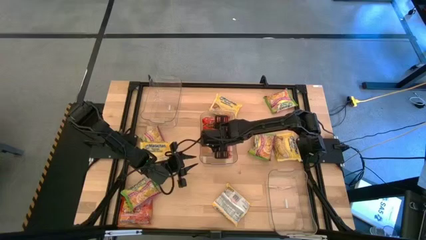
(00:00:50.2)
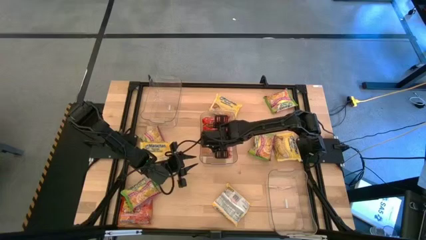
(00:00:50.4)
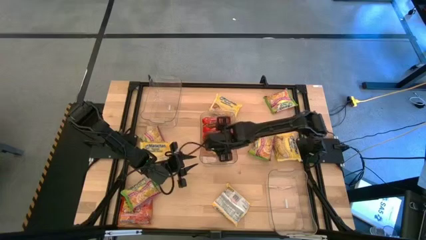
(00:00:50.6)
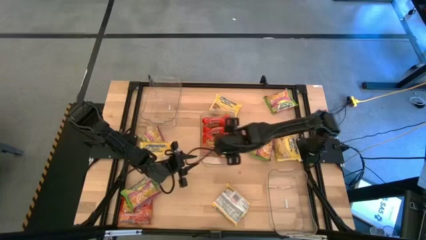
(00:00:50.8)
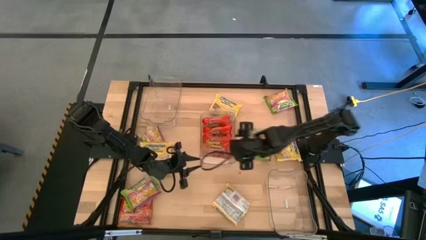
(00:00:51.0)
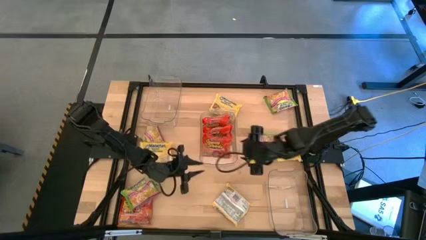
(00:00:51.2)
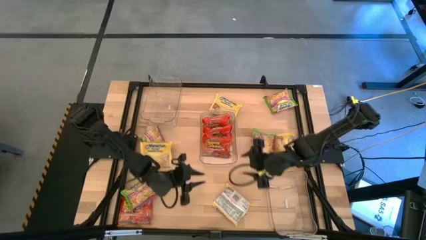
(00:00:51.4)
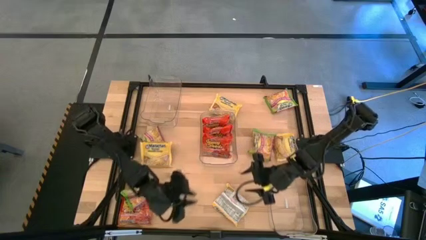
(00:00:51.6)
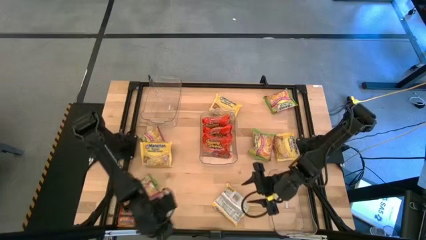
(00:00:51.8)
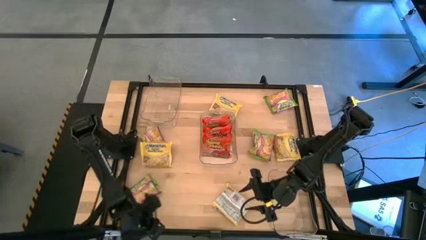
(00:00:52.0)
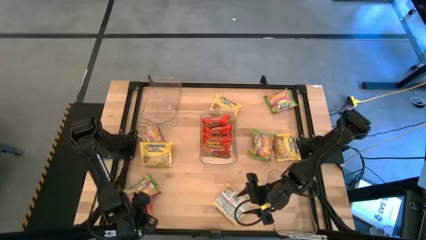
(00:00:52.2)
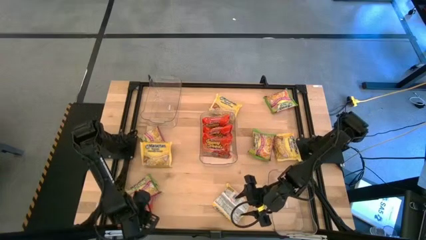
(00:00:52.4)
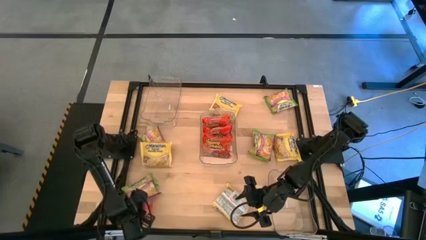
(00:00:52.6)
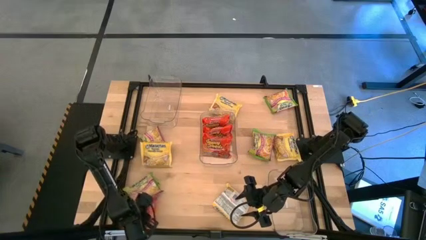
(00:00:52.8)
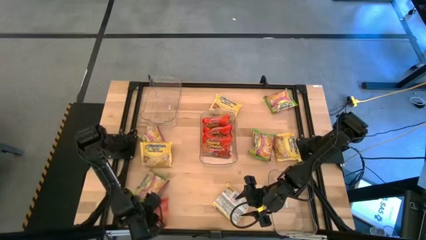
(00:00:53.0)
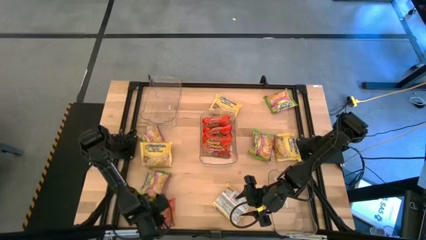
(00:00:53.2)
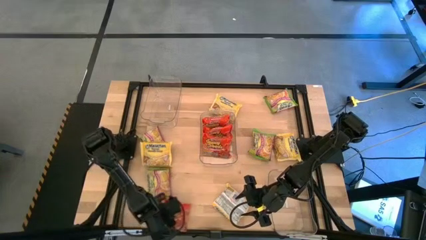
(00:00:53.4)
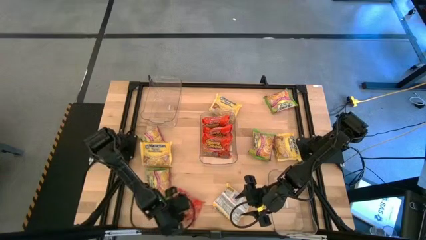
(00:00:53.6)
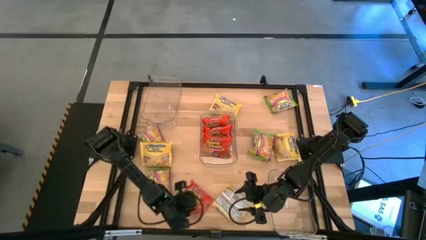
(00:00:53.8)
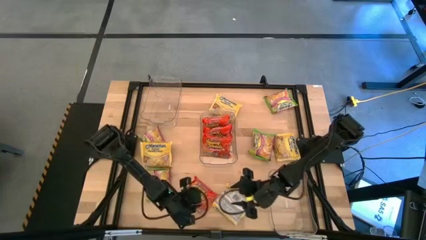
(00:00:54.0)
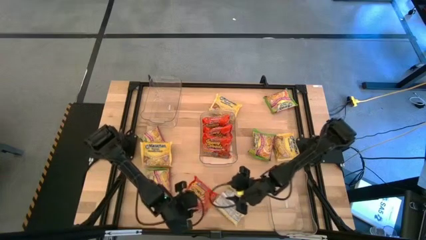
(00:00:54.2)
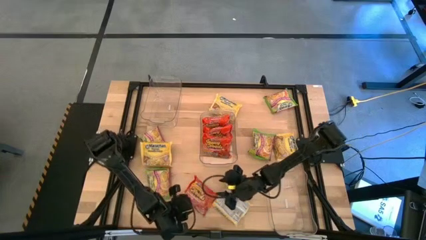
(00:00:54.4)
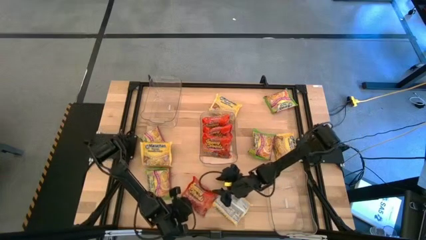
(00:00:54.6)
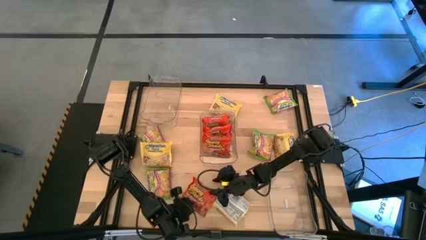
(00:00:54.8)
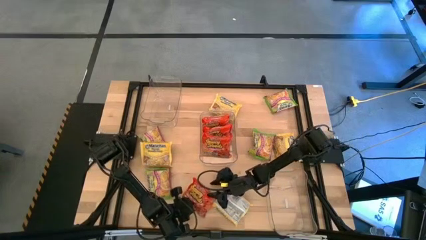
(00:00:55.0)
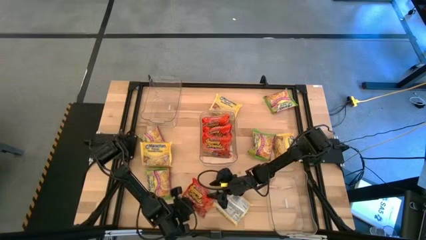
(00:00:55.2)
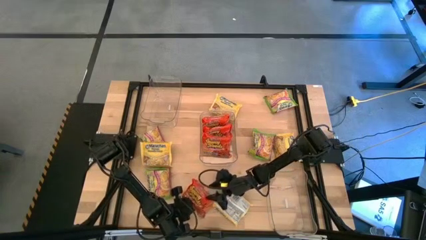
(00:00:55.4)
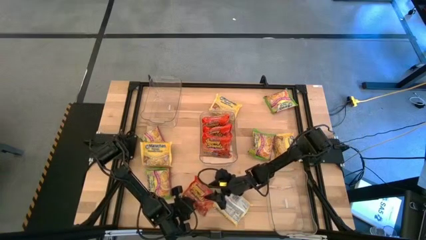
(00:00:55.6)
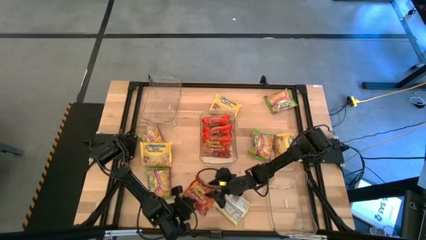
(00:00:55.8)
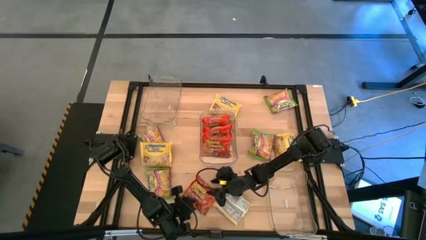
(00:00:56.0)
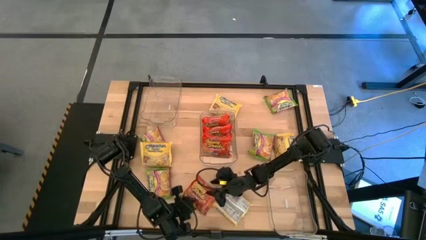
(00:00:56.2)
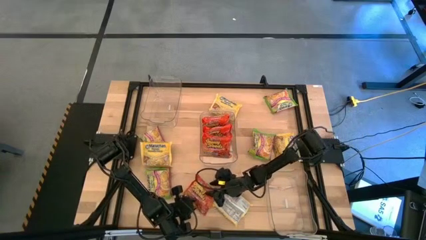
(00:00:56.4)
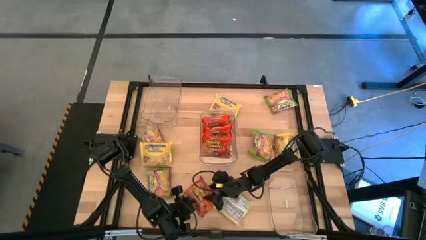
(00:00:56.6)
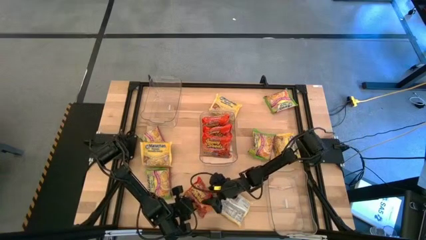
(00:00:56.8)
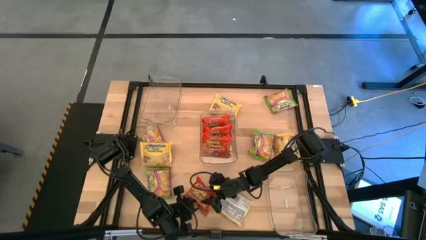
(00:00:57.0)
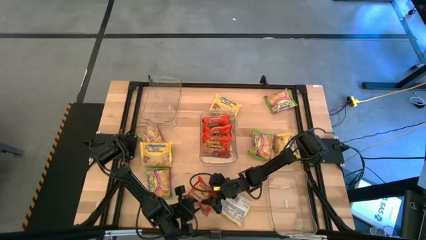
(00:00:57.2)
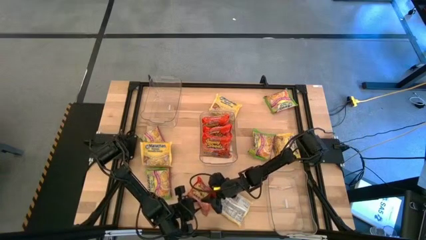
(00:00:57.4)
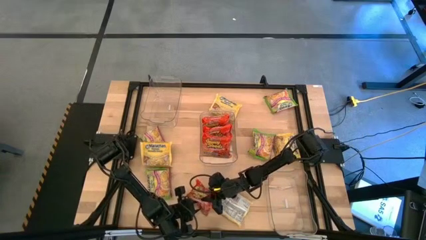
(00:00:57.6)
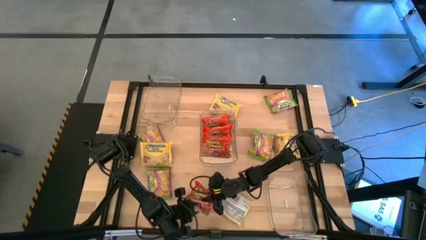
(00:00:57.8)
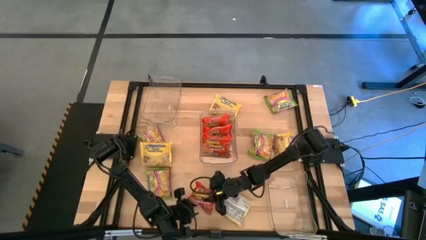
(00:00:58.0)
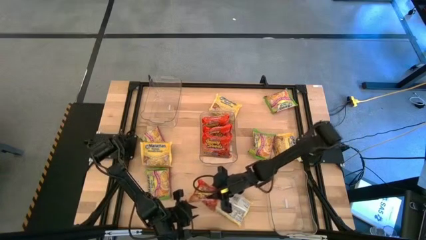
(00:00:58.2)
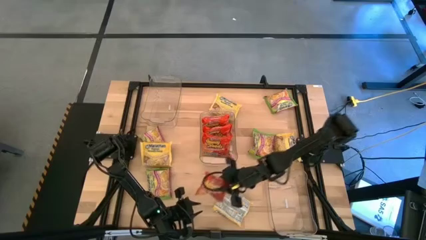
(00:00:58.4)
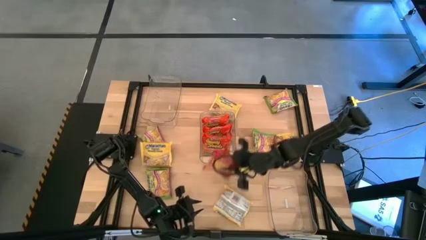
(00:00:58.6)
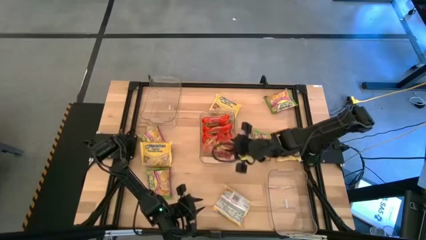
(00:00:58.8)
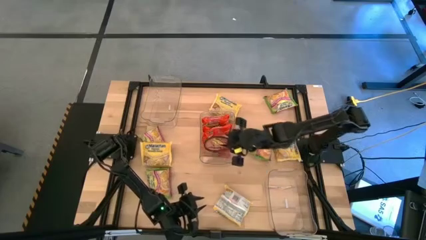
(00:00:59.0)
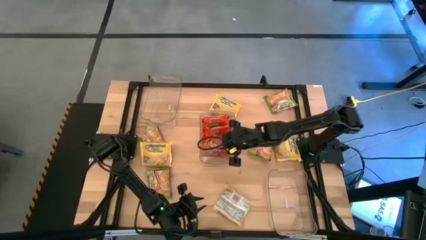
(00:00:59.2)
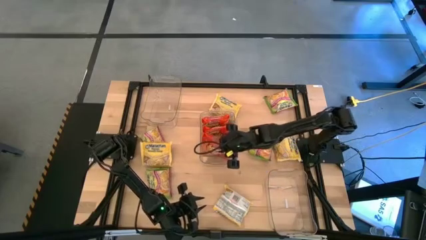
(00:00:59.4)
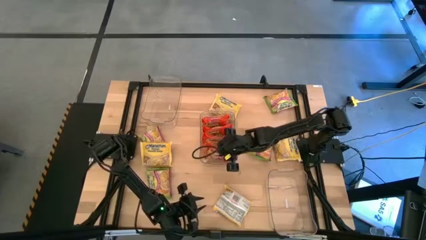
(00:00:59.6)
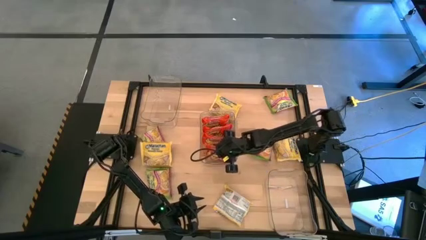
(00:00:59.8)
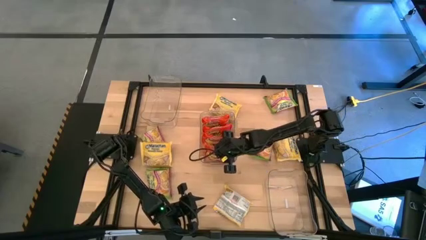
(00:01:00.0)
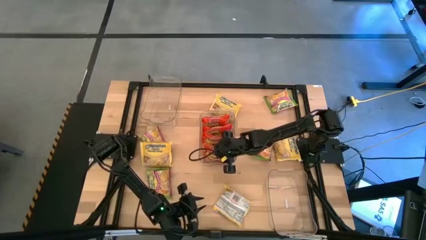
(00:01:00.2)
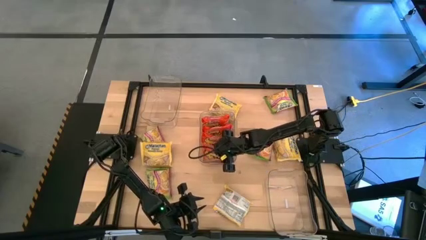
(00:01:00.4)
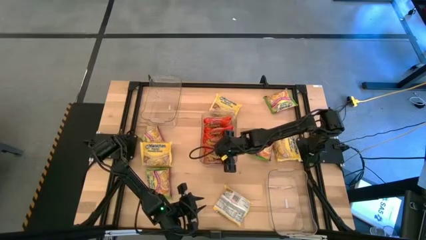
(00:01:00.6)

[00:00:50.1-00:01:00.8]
Task: Sort Maruchan noodles
Put the orange noodle pack into the middle transparent bin
